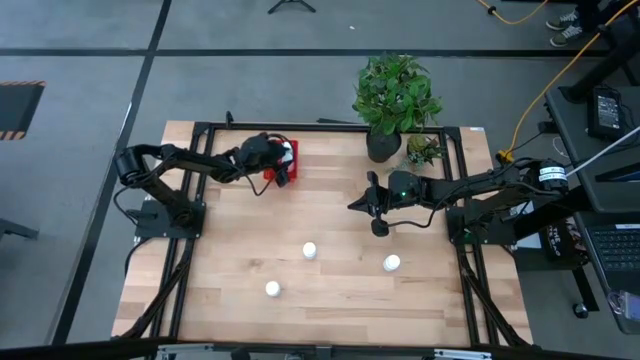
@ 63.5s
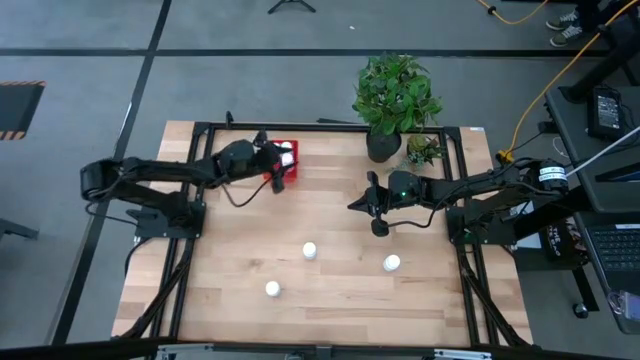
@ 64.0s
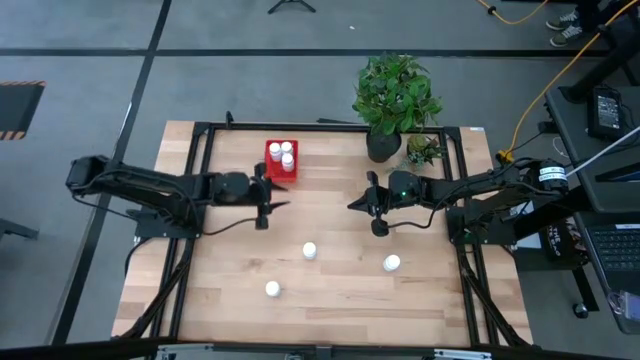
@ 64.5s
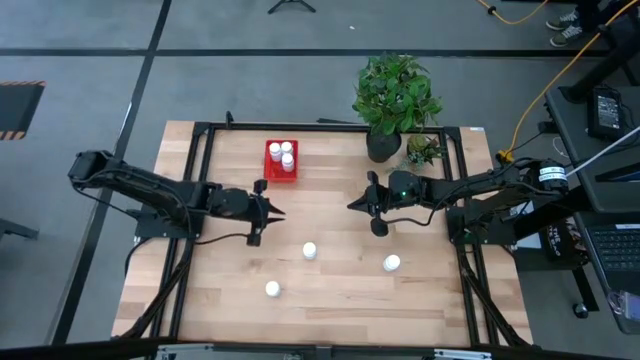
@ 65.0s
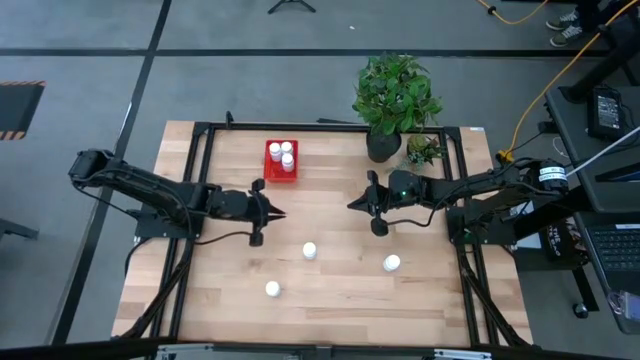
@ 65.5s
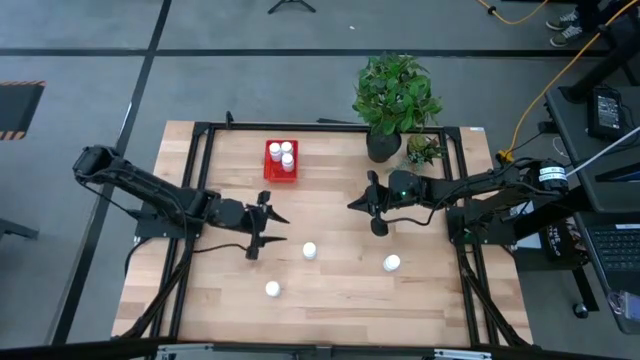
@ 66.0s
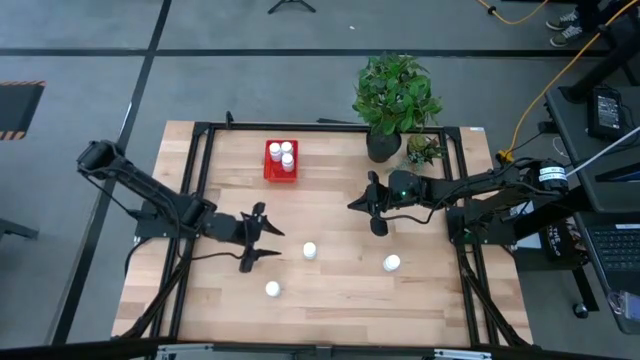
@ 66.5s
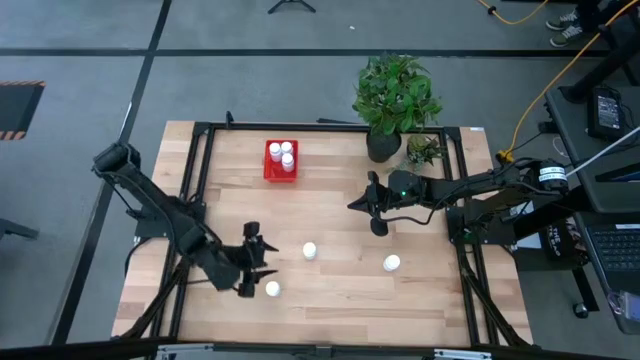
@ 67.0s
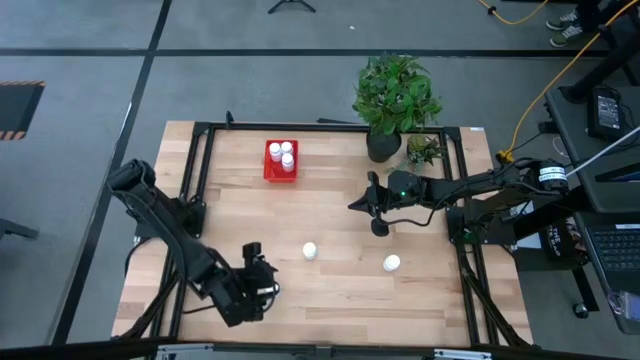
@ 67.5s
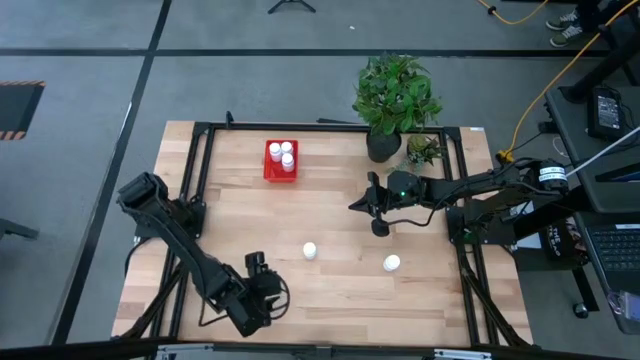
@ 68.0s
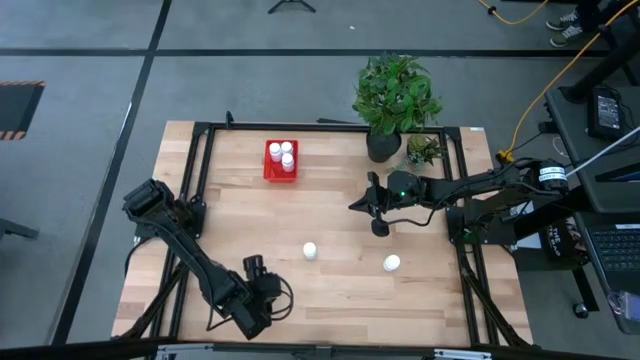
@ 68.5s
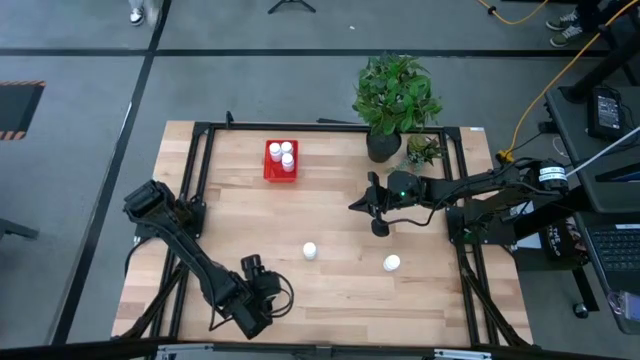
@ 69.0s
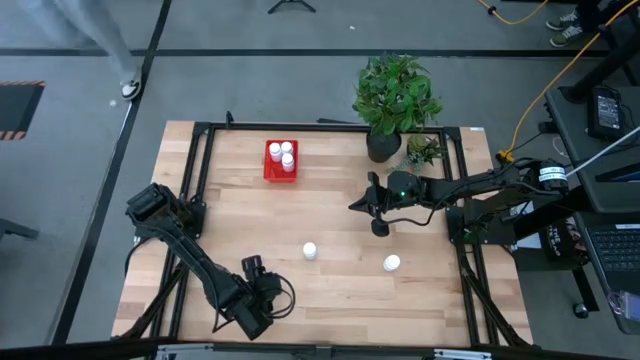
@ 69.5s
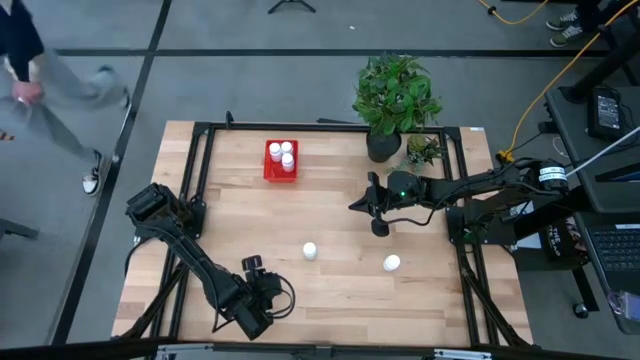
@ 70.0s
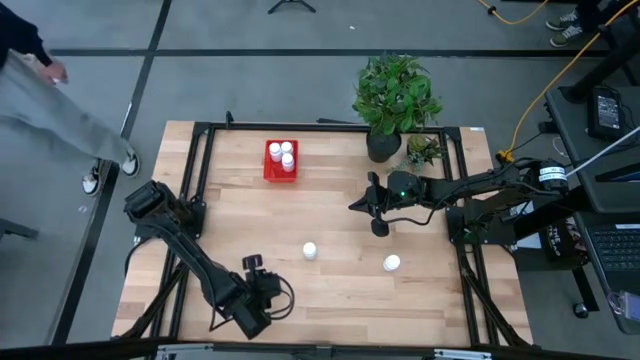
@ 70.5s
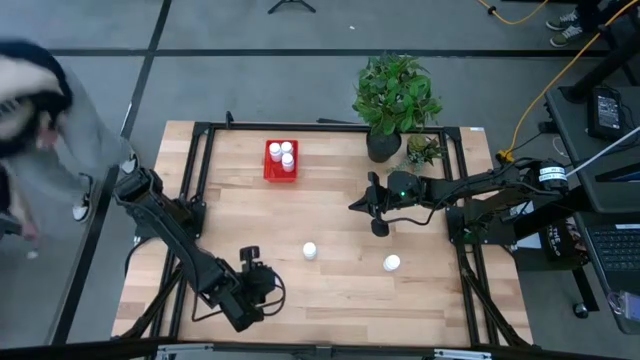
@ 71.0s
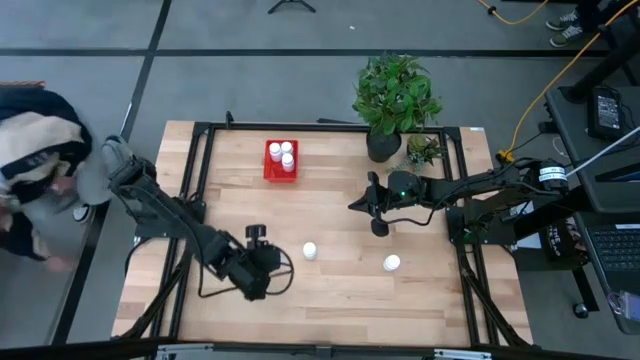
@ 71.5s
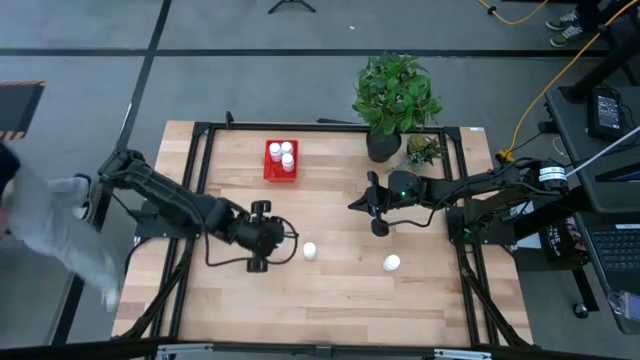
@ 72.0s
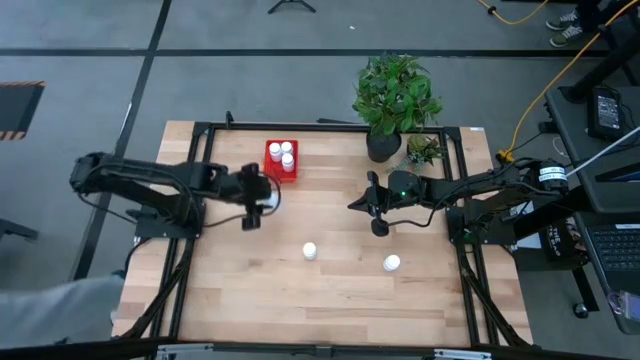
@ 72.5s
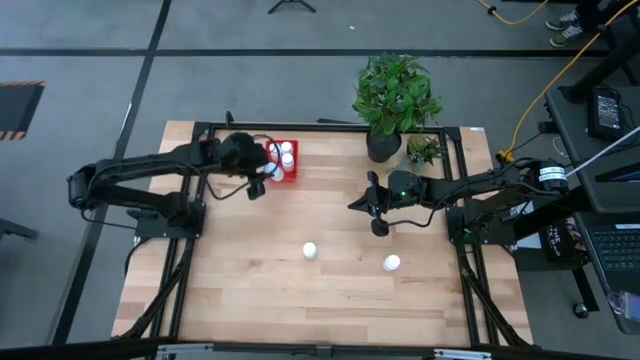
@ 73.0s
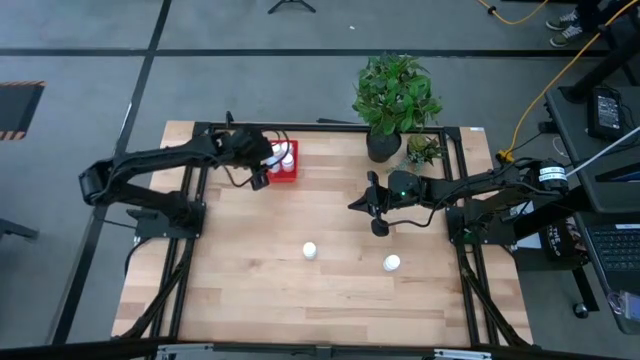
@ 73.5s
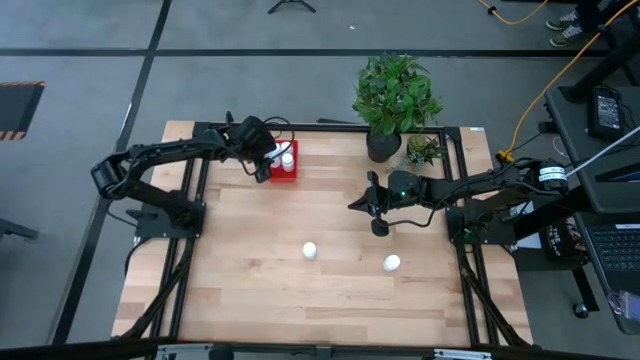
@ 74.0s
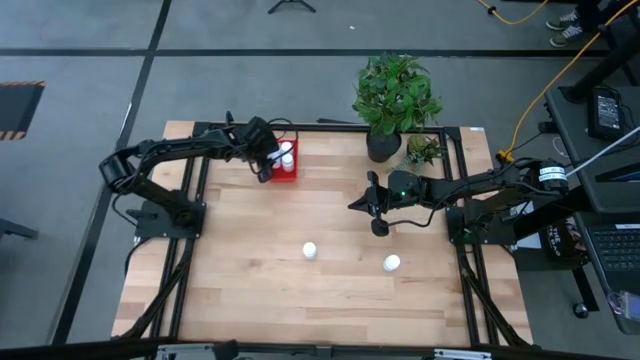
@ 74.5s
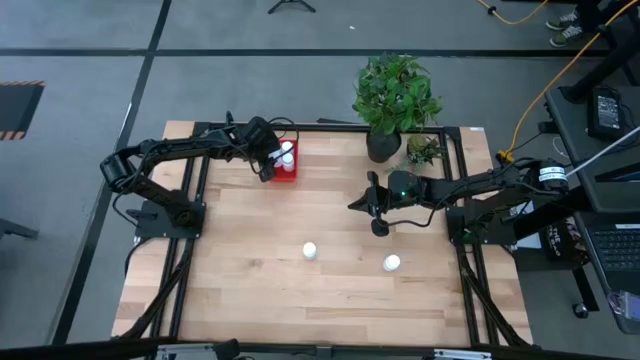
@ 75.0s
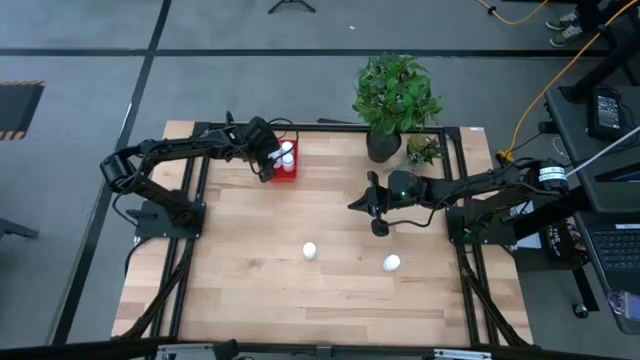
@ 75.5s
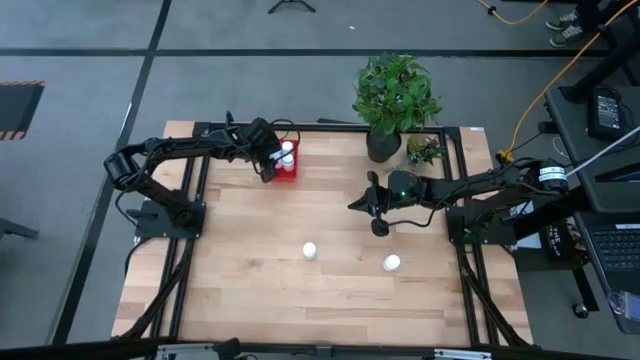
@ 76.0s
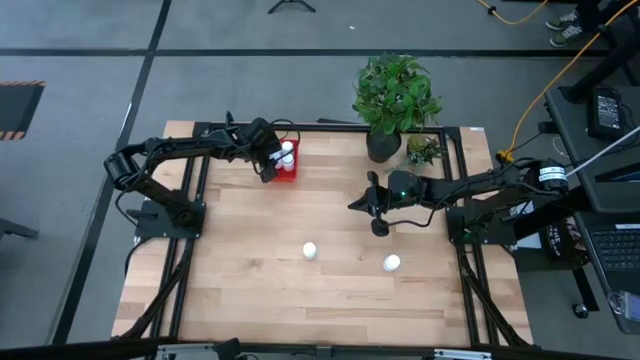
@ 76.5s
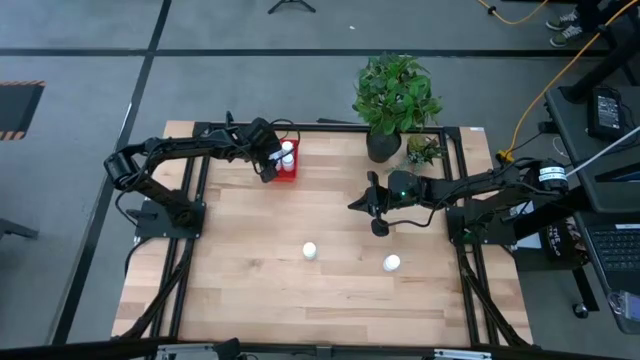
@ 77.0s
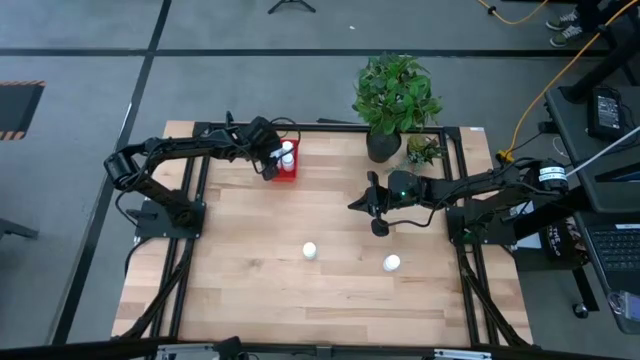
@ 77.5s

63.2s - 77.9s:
Task: Pick and place pill bottles into a basket
Put the white pill bottle into the red bin

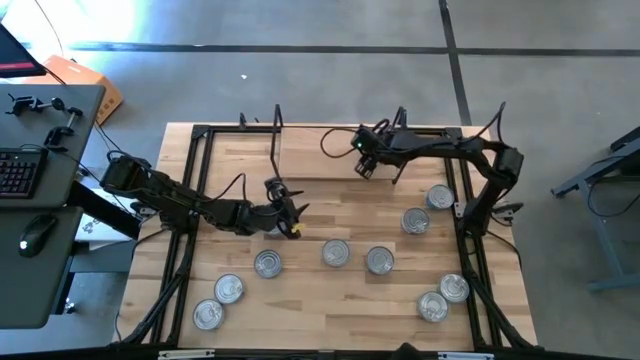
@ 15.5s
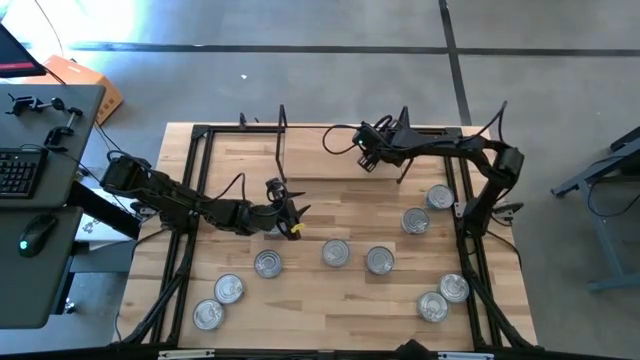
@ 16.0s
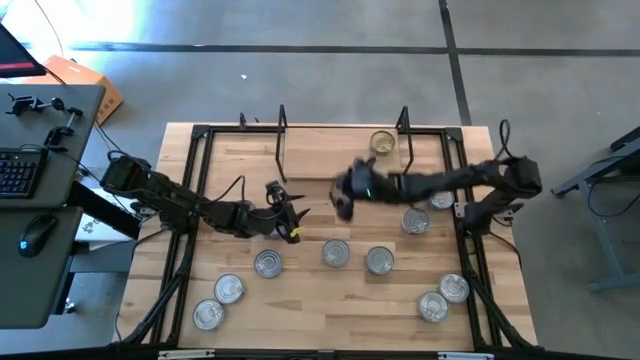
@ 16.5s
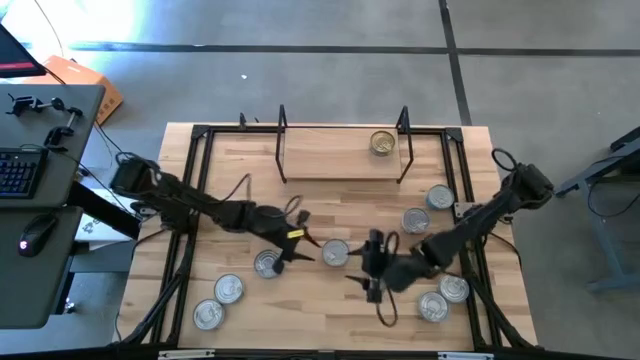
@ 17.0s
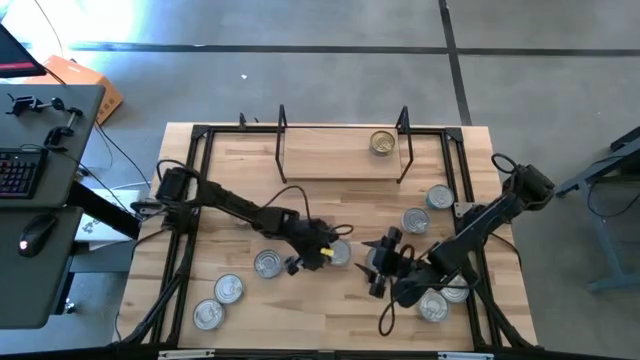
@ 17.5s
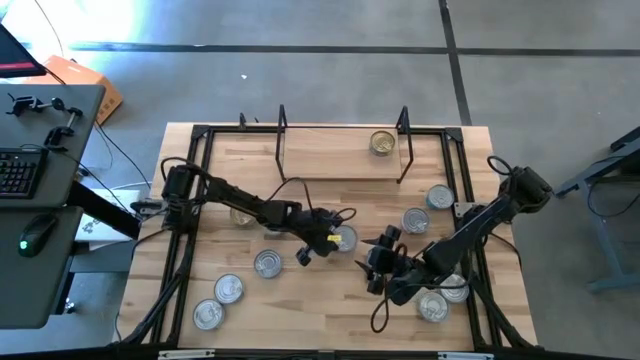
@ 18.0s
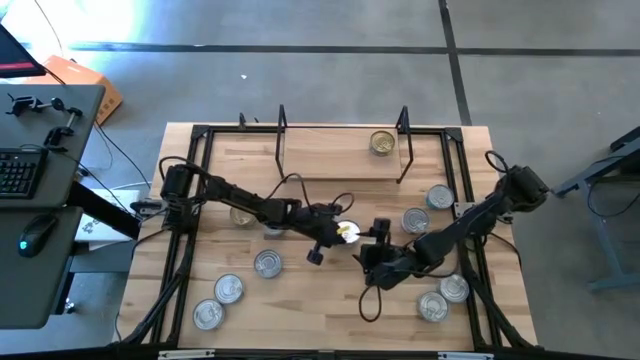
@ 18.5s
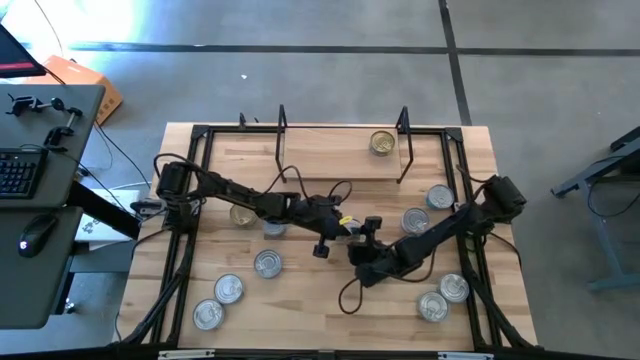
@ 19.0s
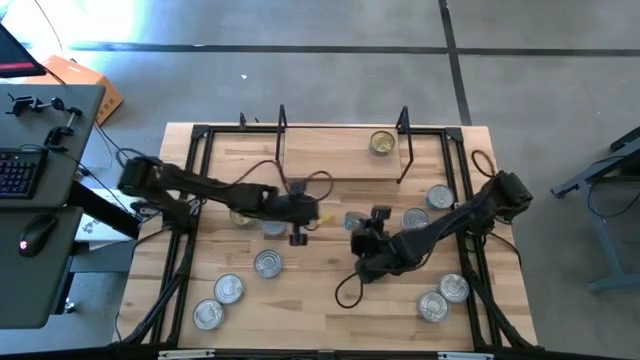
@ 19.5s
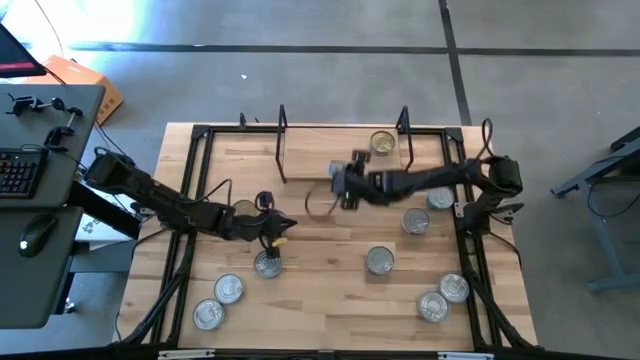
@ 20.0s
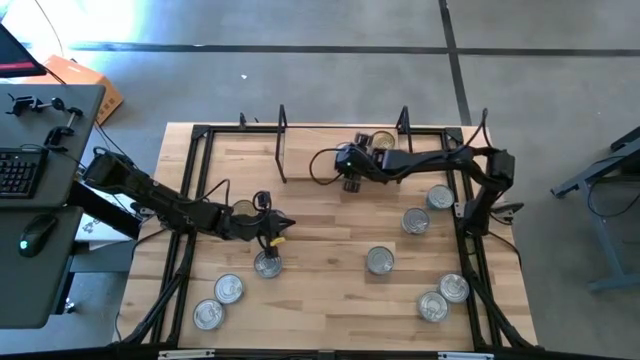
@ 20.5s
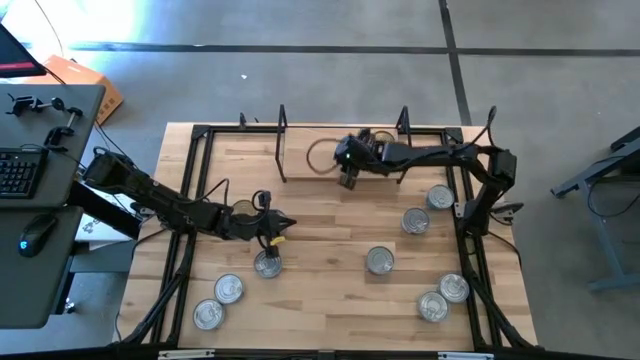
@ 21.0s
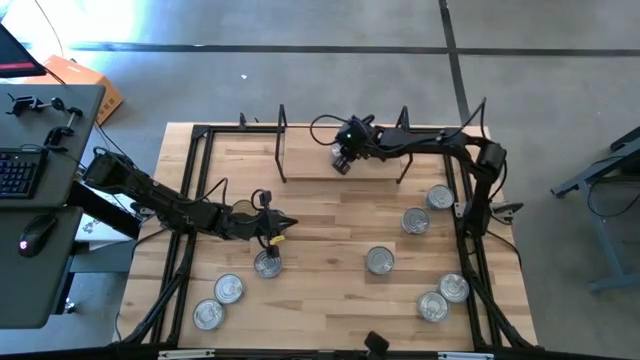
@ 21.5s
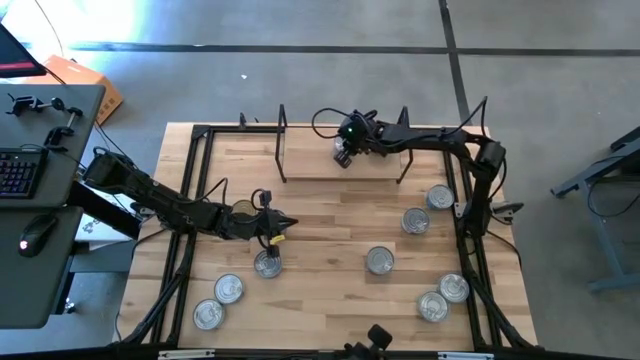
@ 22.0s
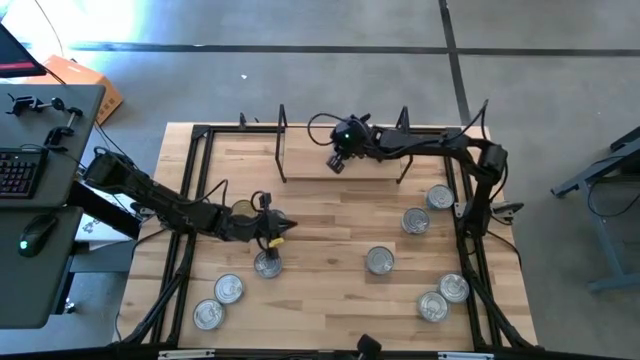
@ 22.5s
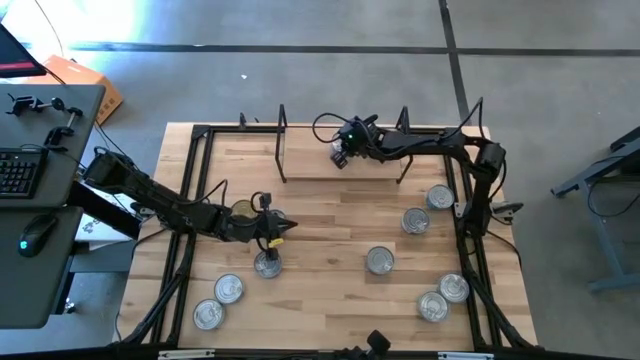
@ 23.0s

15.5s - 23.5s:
Task: Stack canned seafood by type on shelf
Put the yellow-blue tuna can on the shelf
